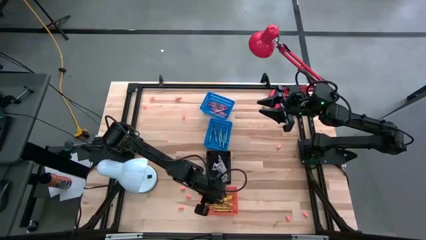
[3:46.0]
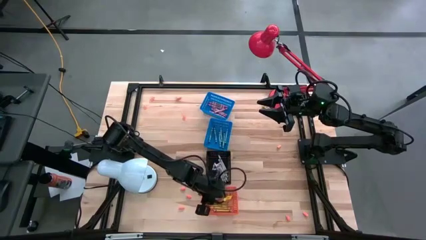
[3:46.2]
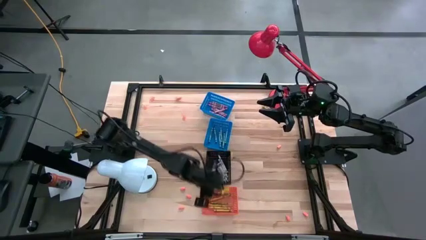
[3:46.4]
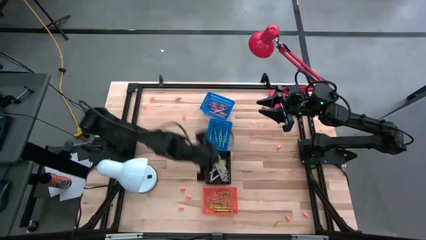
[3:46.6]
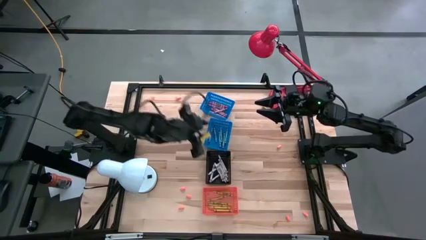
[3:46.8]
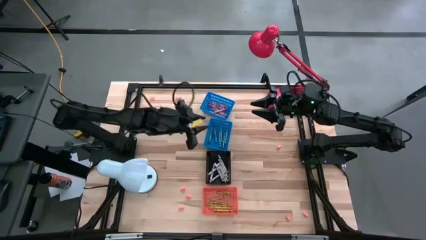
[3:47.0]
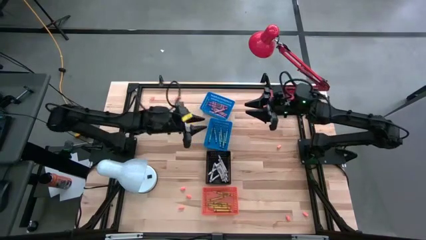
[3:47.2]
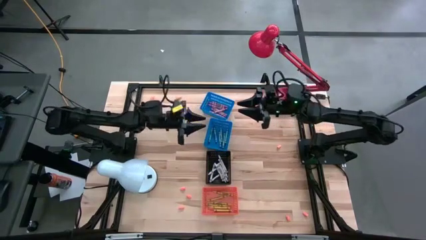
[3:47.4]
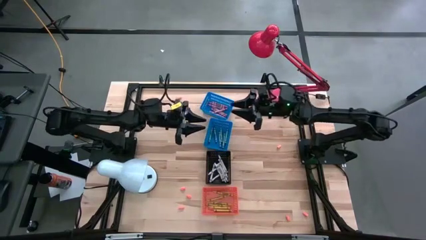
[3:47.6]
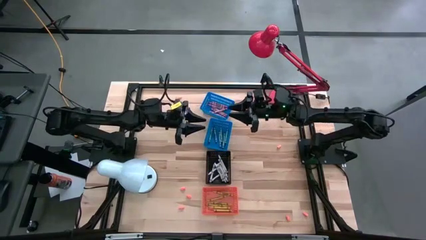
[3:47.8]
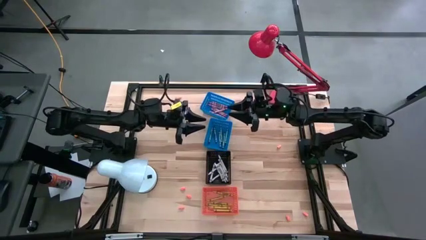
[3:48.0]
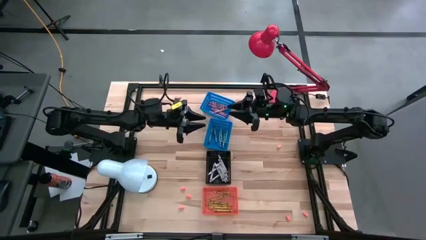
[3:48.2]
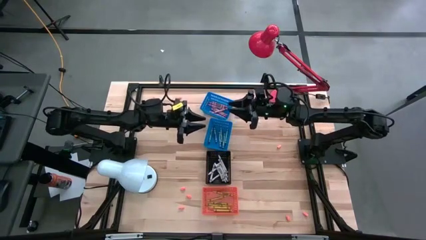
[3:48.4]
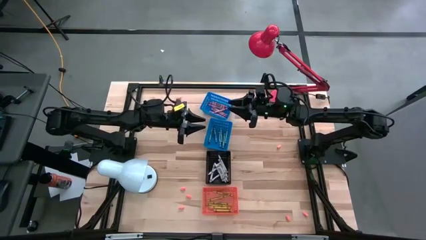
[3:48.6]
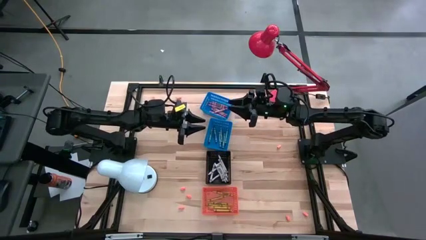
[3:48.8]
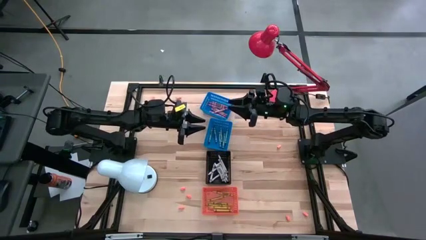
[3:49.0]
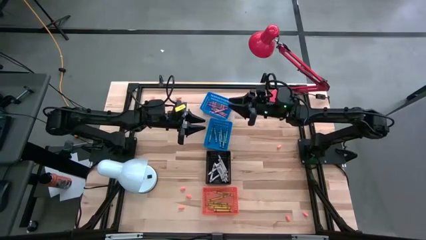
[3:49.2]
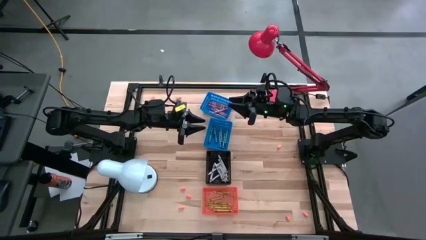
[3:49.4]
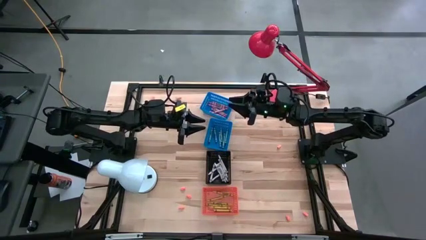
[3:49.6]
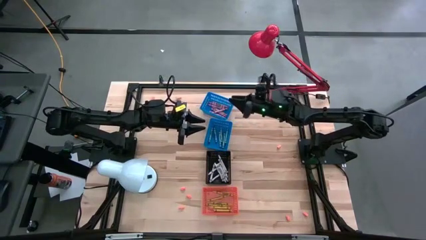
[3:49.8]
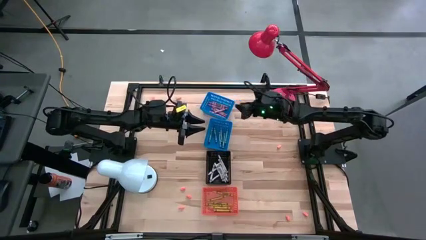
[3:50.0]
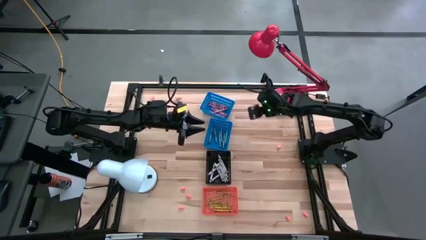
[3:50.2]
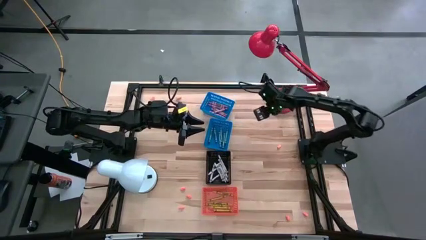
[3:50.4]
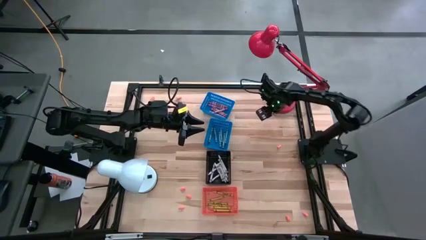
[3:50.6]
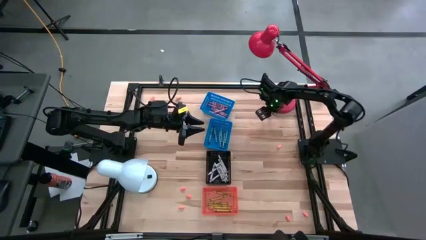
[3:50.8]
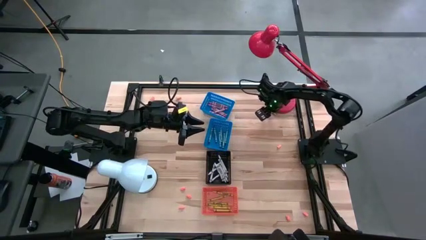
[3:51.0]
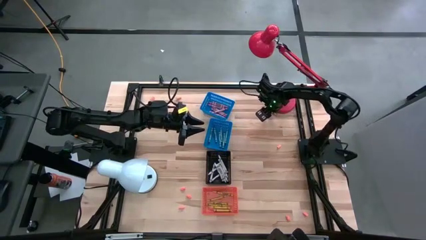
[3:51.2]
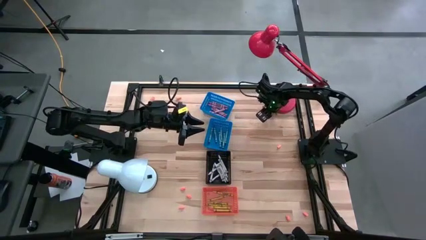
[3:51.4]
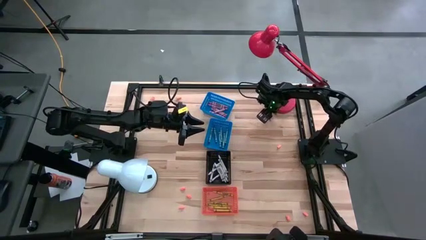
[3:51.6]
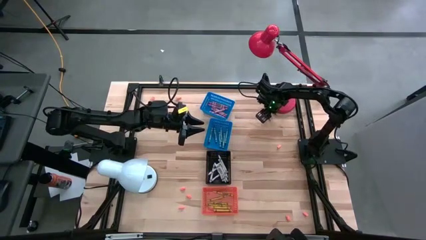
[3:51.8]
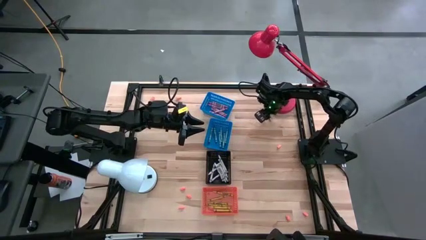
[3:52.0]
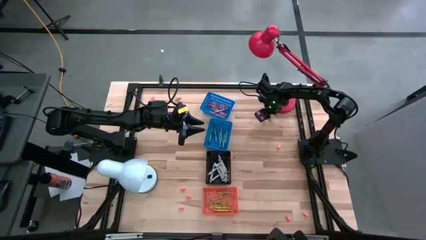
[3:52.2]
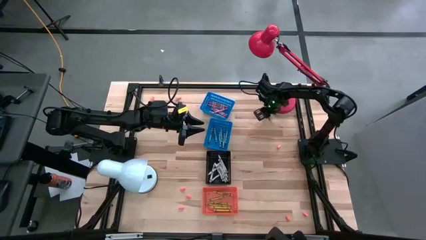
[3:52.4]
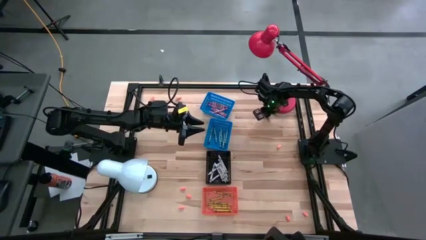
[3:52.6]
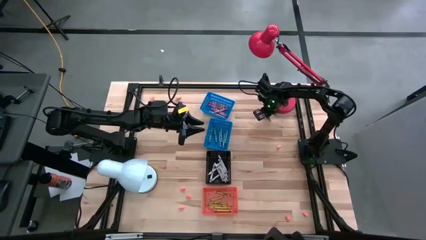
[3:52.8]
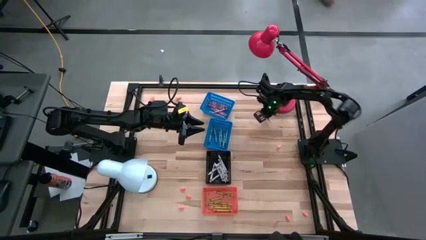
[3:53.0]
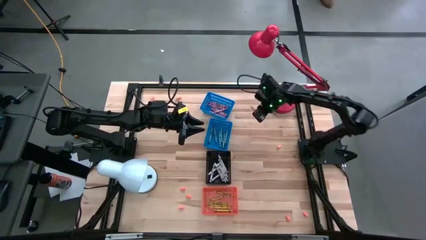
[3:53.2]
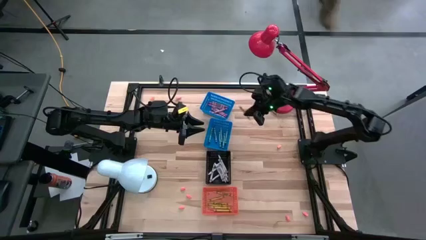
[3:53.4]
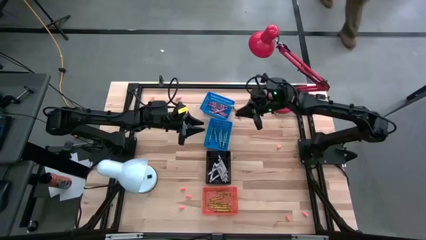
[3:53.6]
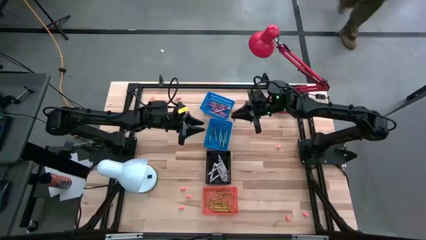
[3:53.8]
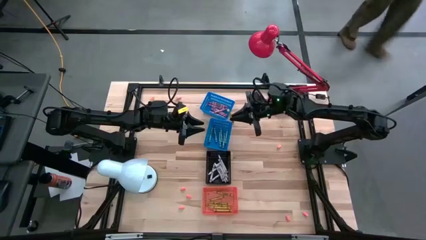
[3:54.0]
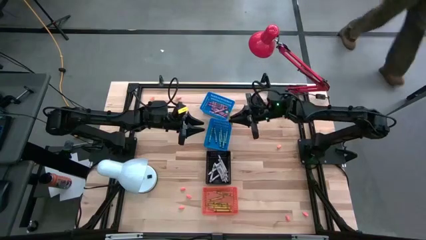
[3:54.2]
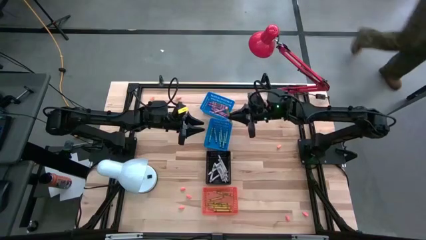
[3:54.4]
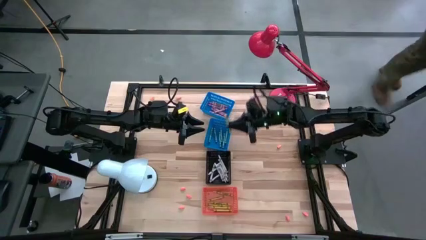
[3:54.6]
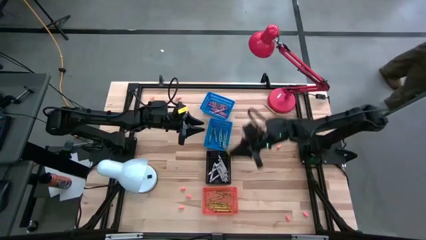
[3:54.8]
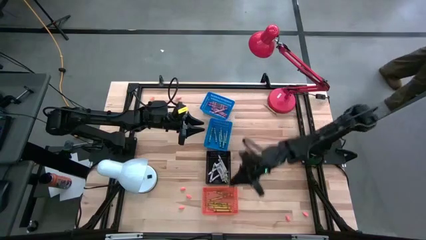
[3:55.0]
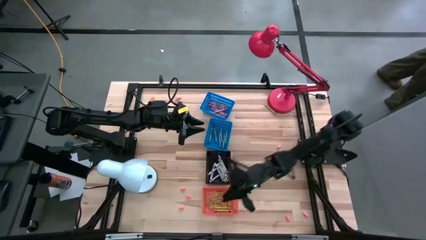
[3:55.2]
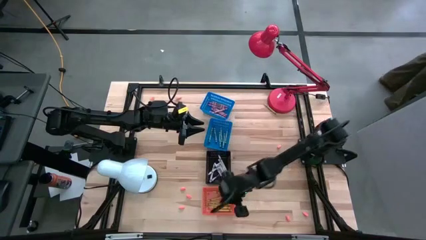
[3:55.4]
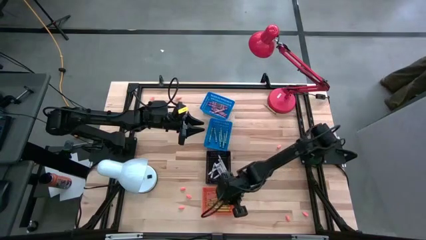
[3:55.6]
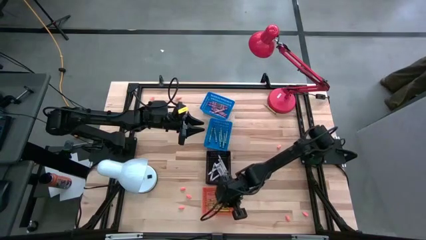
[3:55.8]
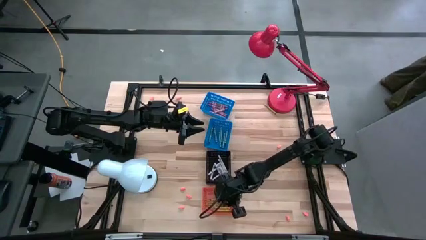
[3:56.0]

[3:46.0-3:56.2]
Task: Sort crayons
Put the yellow crayon into the orange bin
